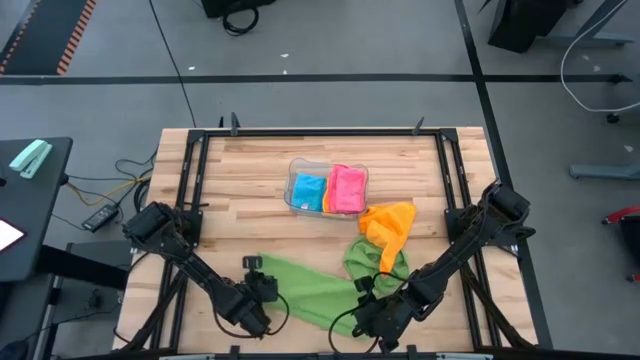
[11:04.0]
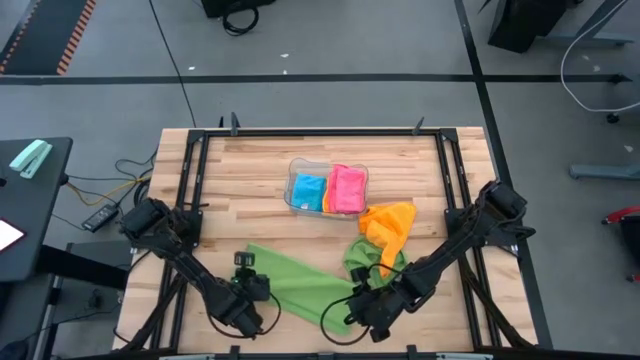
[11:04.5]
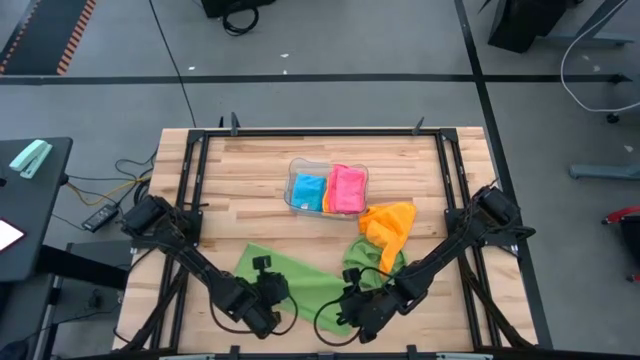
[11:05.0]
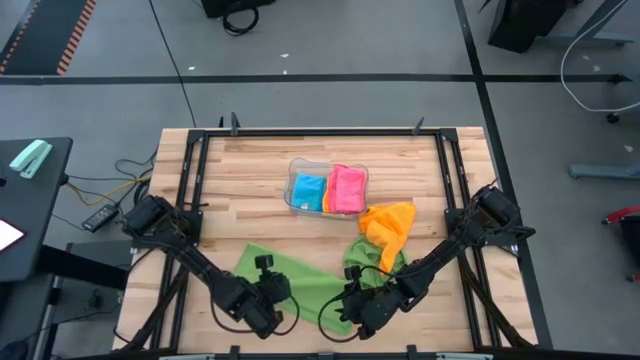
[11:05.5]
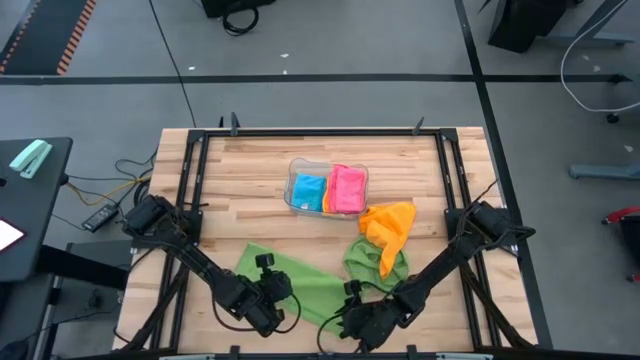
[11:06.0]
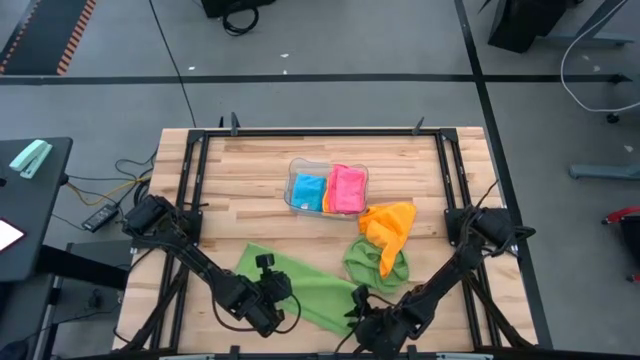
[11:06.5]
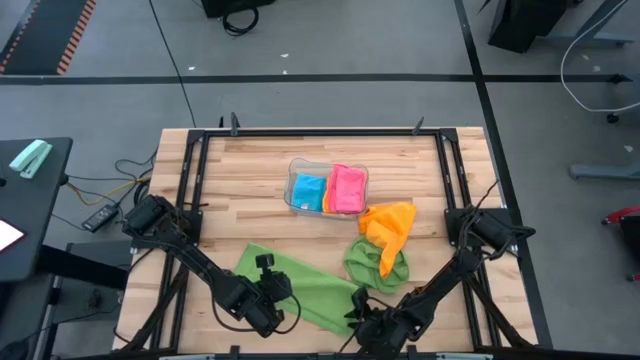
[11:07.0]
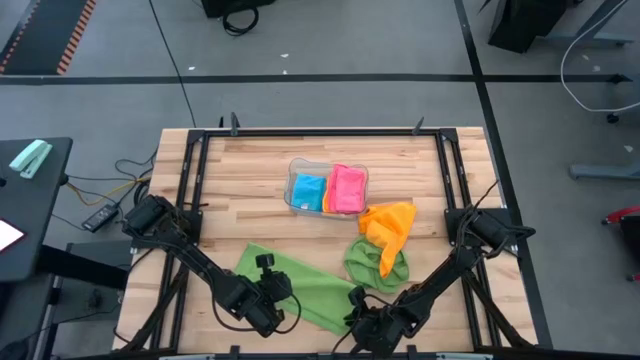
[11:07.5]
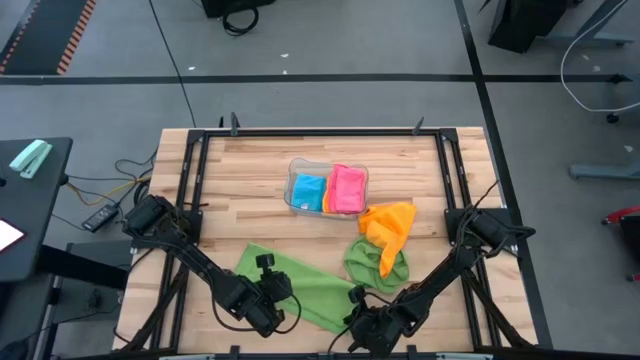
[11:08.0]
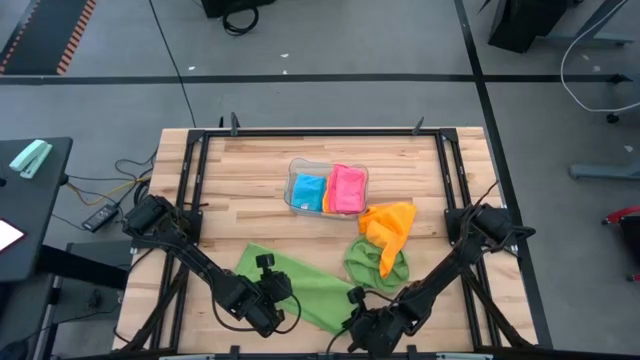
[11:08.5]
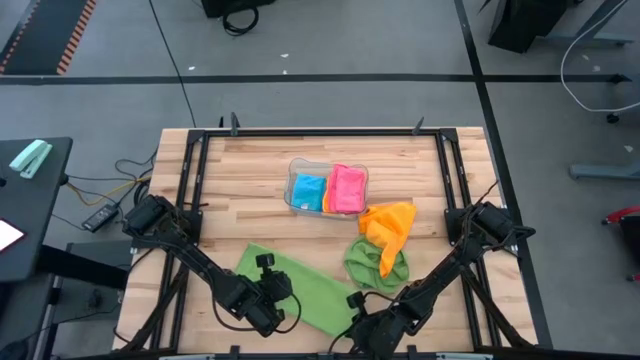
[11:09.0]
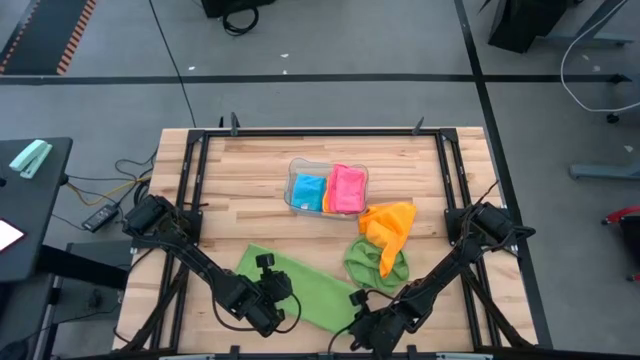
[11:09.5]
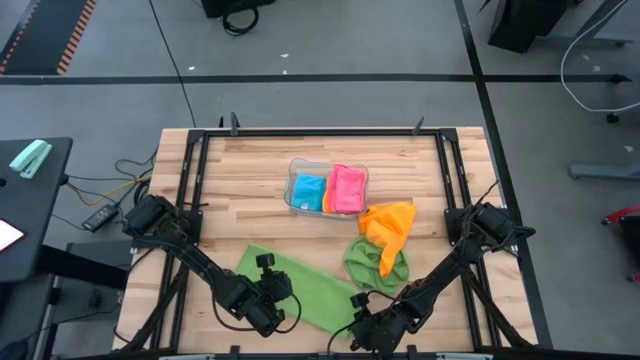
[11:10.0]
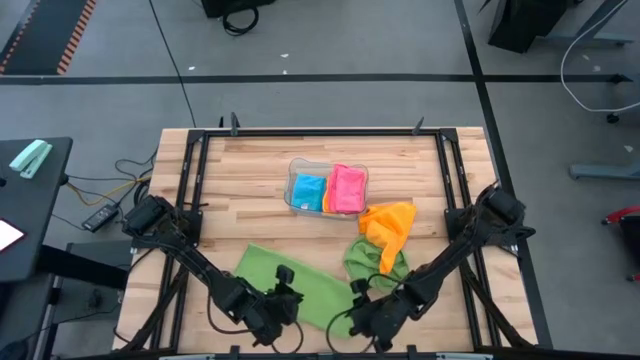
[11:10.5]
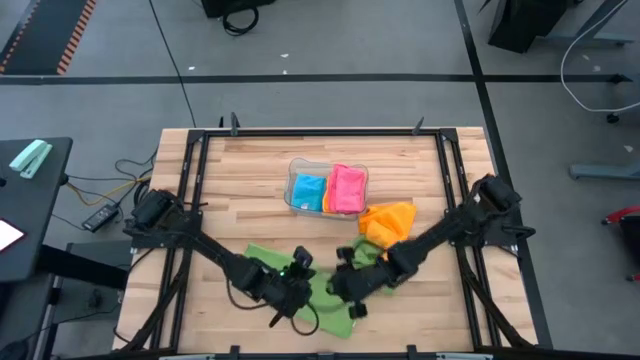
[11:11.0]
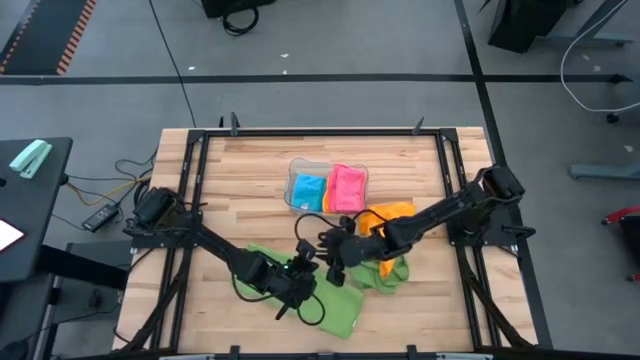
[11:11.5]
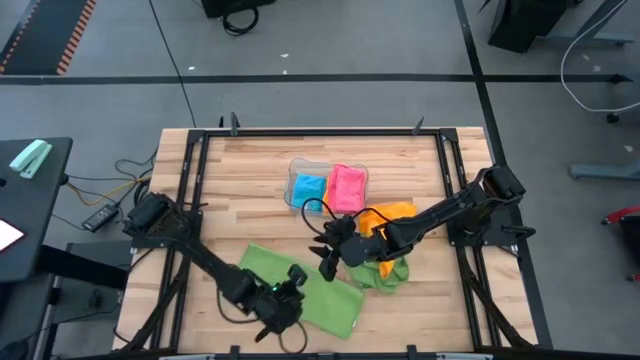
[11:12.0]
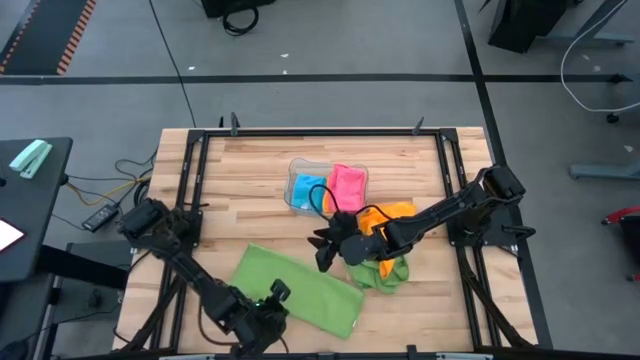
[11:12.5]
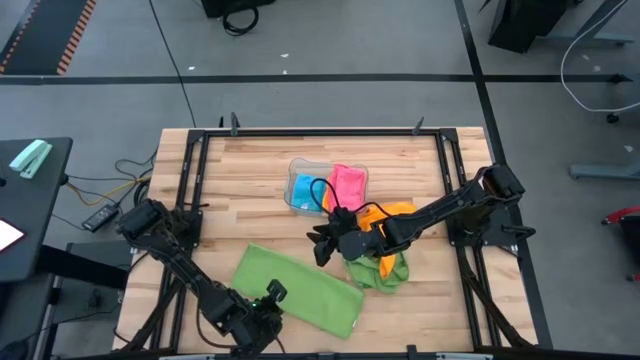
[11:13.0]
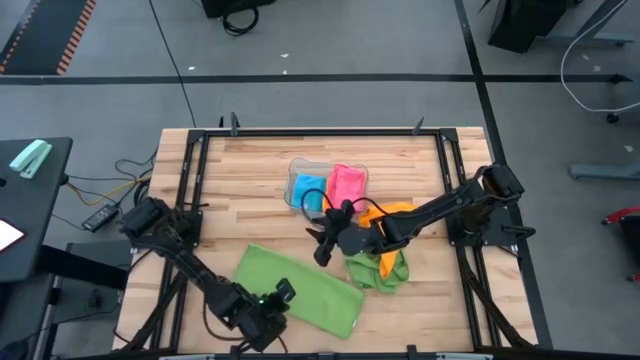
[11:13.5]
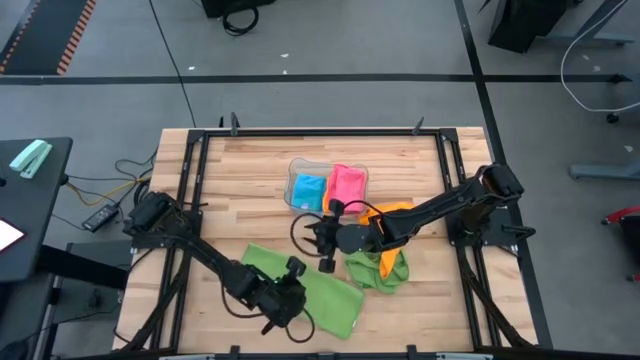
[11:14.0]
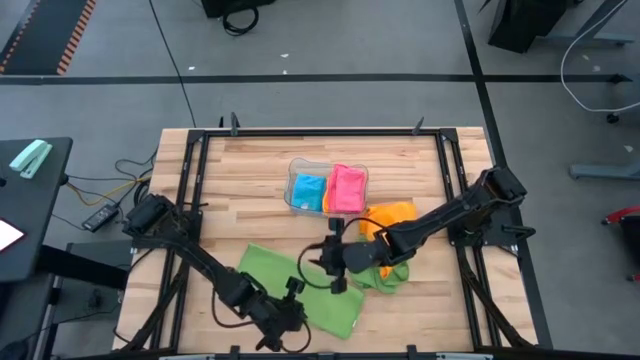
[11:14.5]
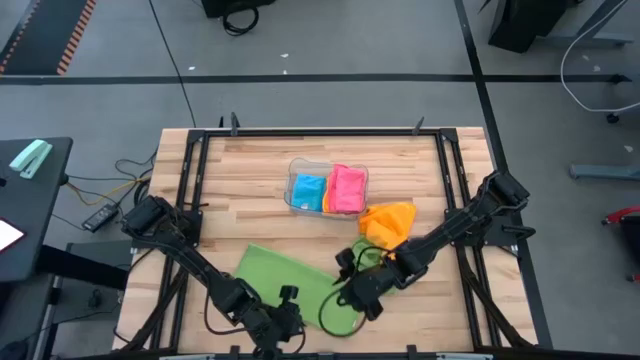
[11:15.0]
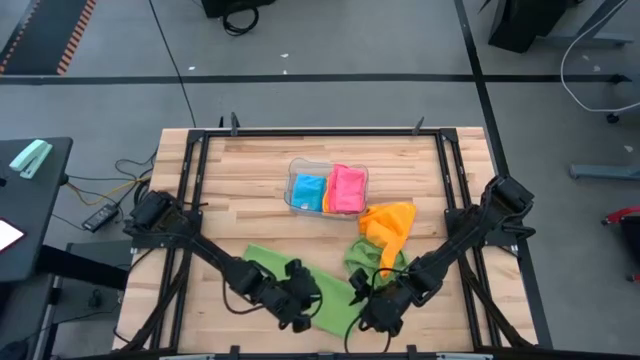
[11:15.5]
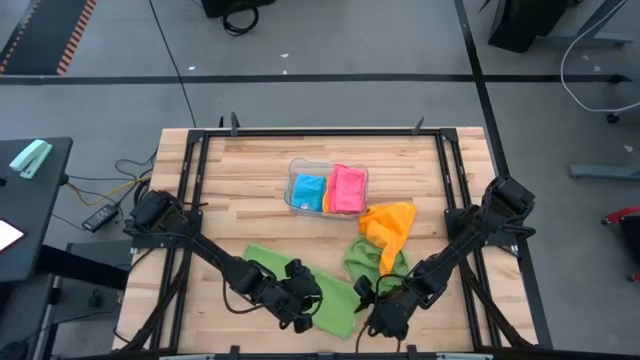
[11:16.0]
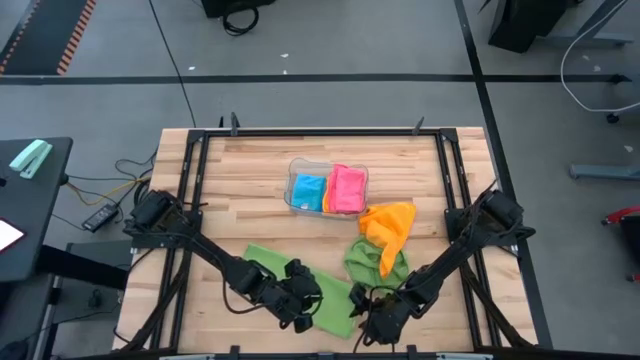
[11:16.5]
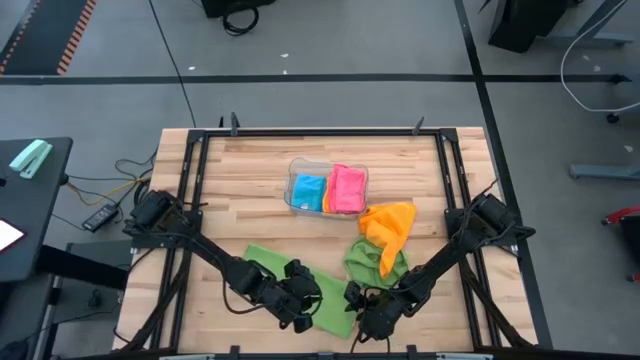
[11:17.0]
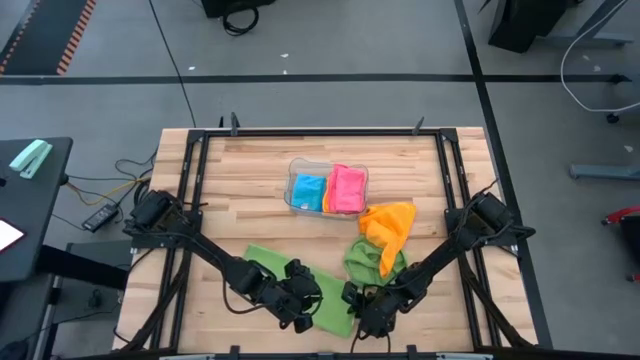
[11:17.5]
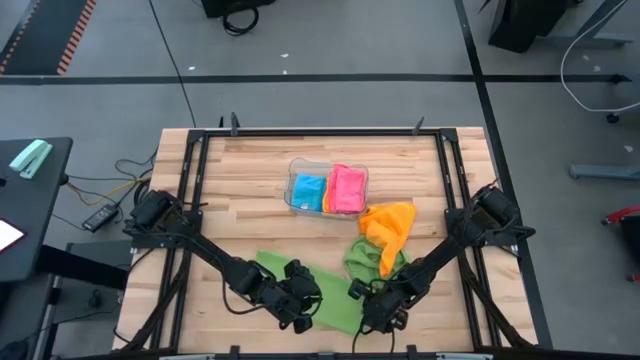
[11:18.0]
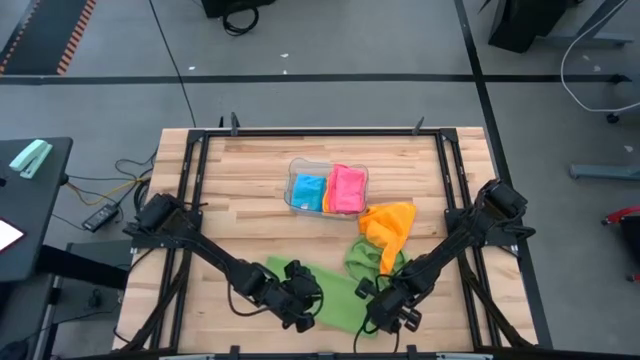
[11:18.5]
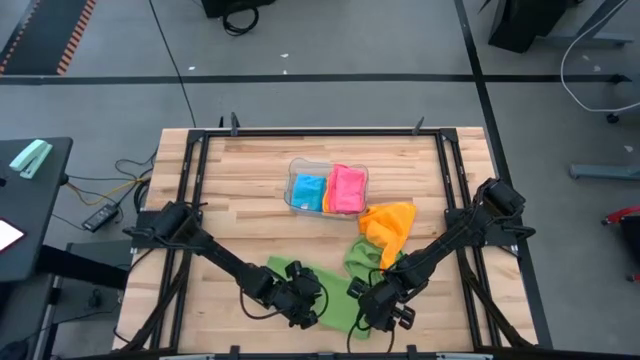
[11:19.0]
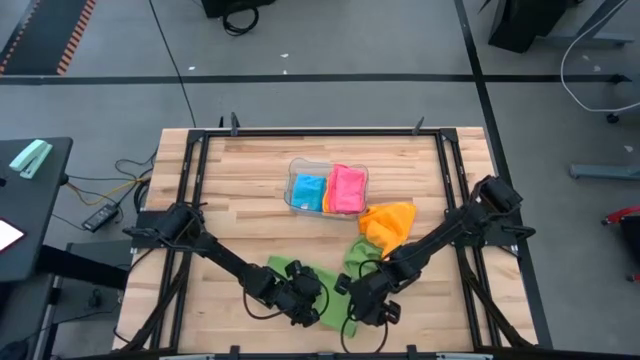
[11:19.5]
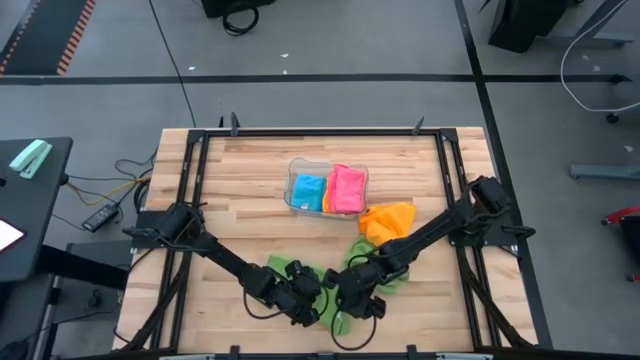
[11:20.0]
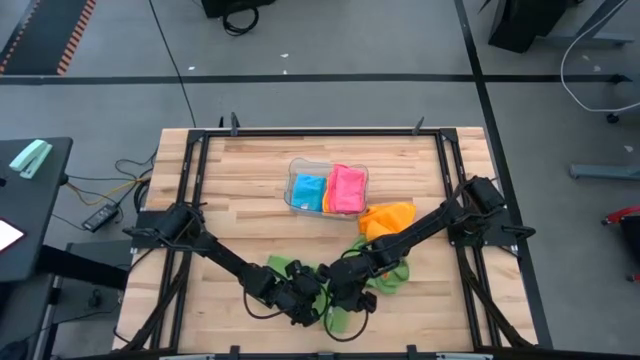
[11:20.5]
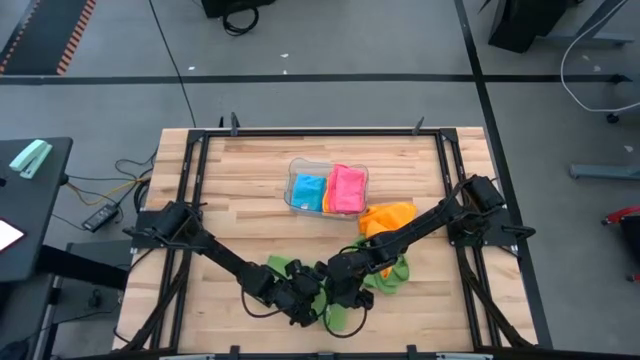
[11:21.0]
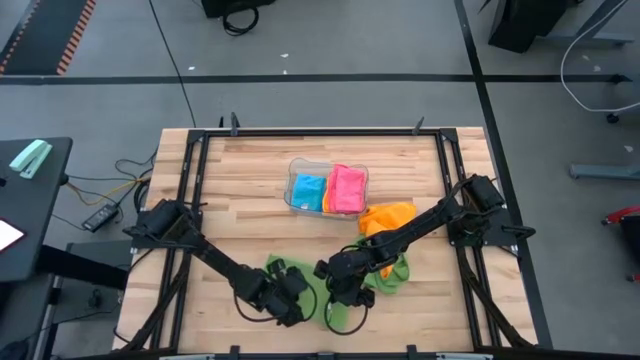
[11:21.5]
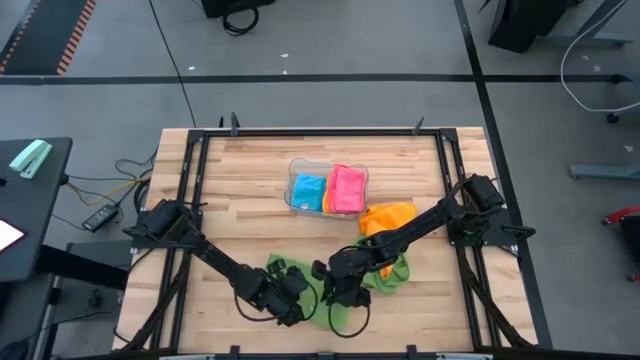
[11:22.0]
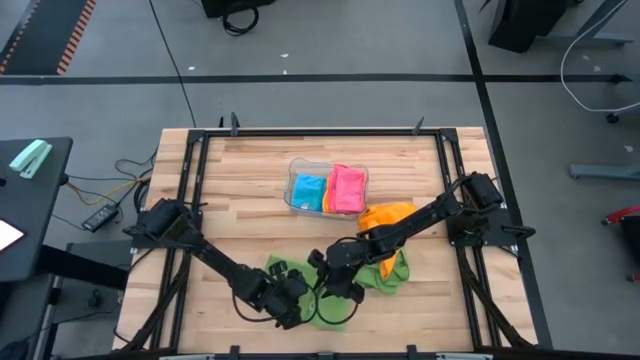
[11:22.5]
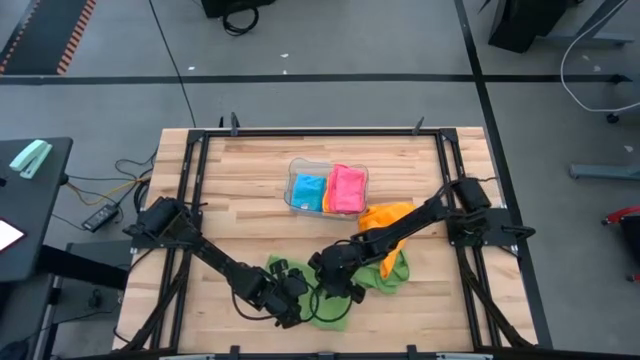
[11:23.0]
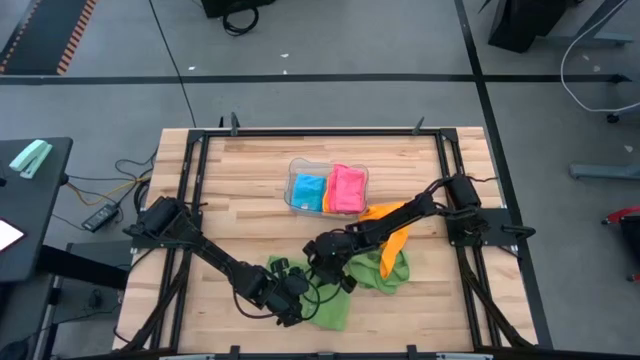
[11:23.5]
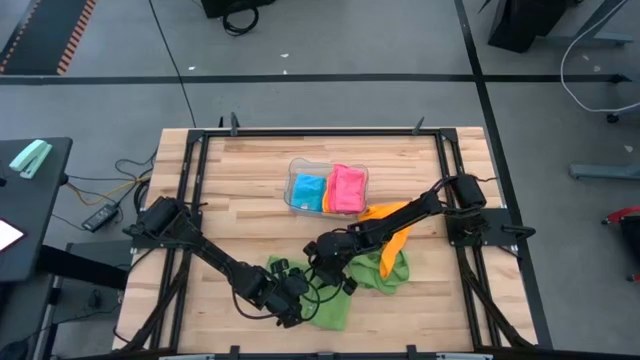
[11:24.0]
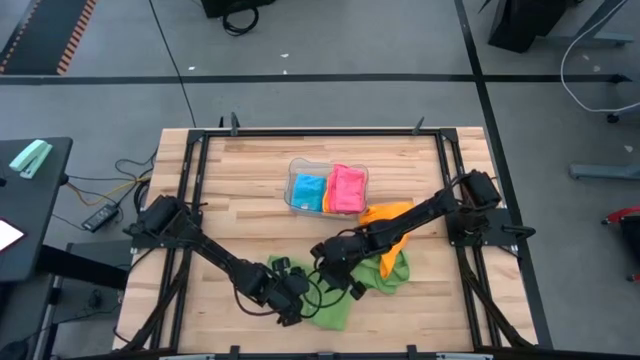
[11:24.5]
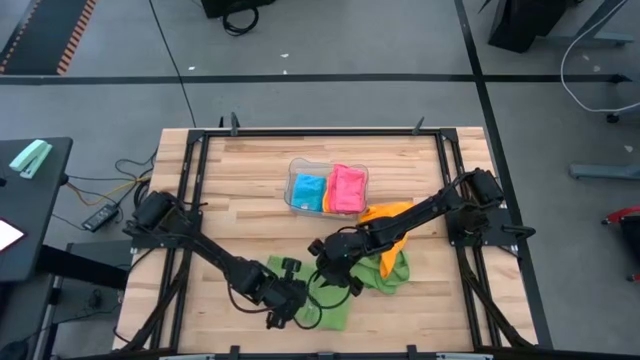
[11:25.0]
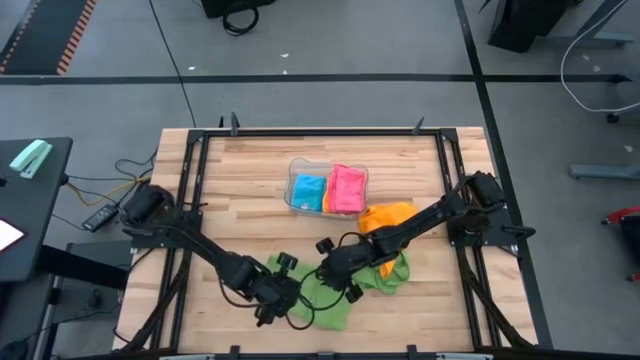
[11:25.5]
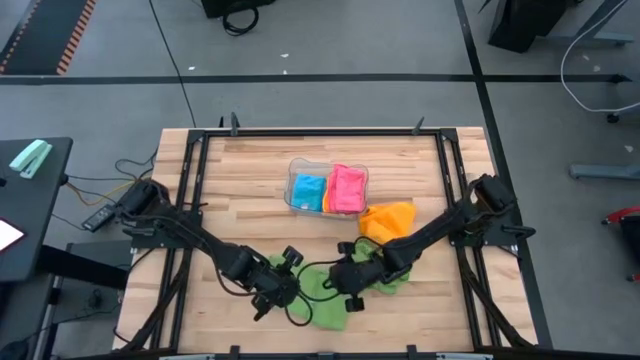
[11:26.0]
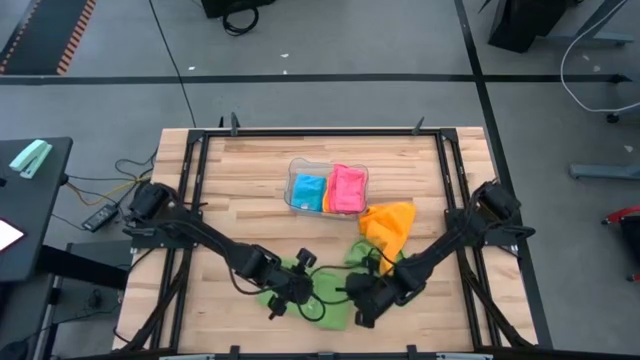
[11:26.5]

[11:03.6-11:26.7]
Task: Fold microfiber towels
Fold the top green microfiber cloth
